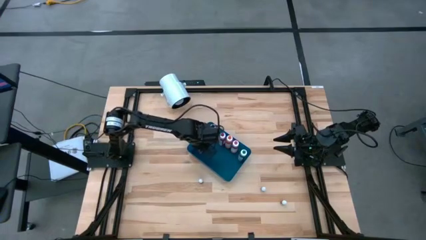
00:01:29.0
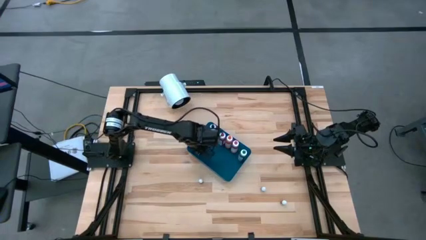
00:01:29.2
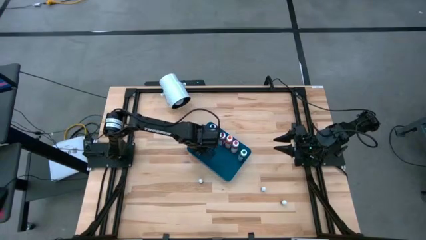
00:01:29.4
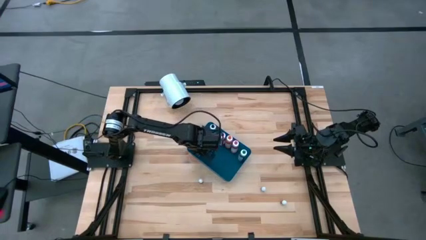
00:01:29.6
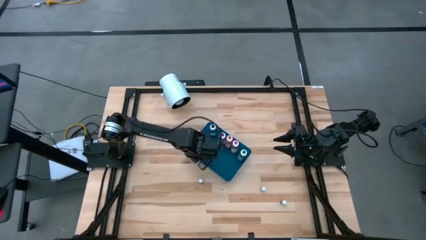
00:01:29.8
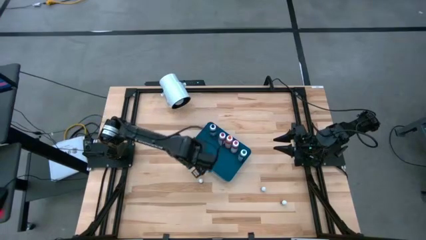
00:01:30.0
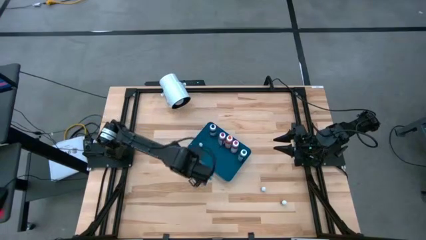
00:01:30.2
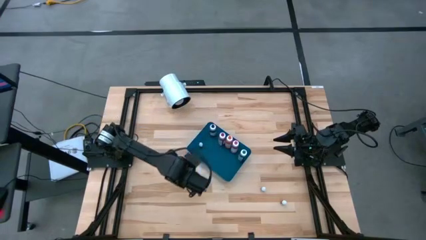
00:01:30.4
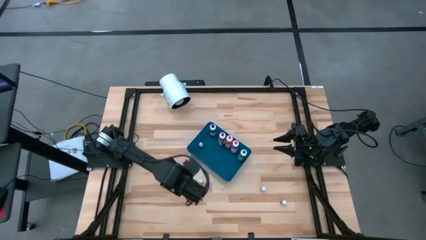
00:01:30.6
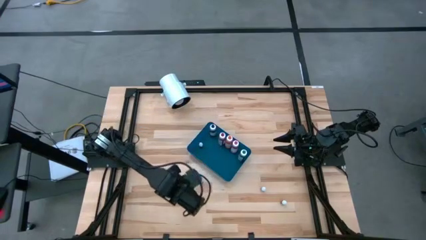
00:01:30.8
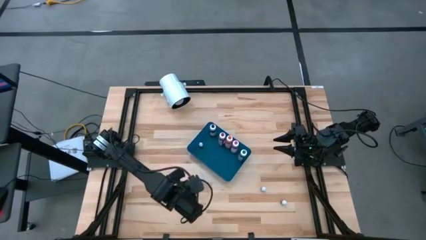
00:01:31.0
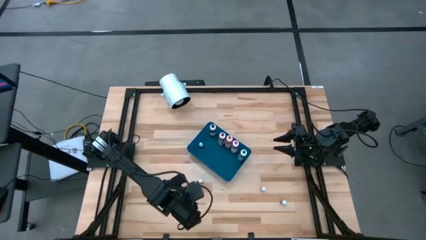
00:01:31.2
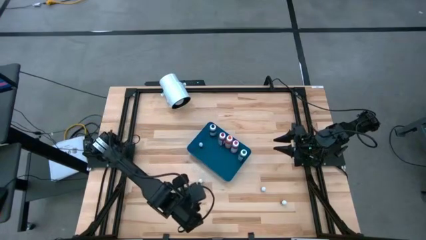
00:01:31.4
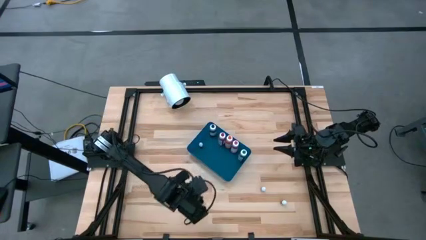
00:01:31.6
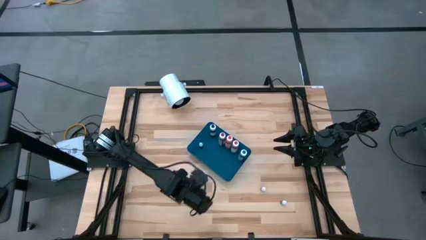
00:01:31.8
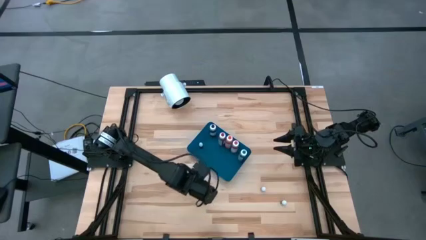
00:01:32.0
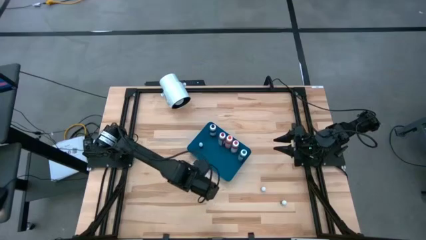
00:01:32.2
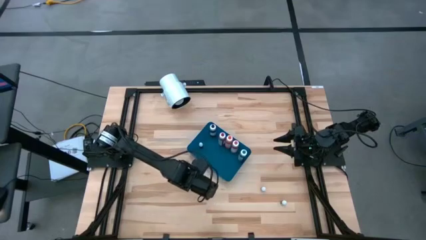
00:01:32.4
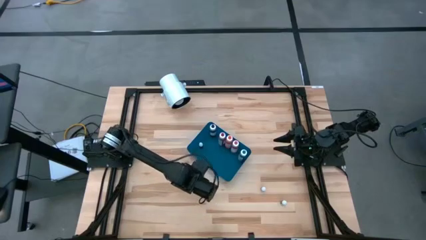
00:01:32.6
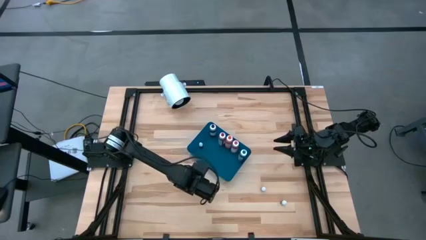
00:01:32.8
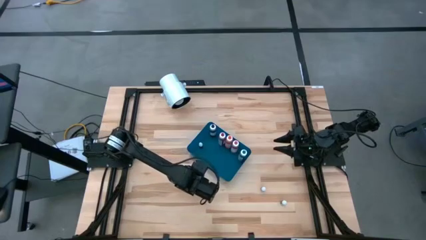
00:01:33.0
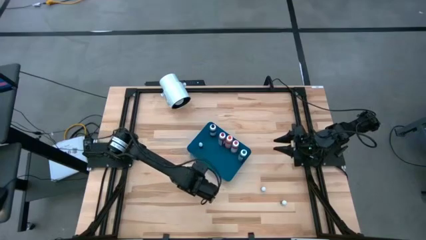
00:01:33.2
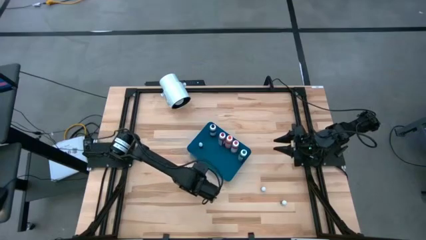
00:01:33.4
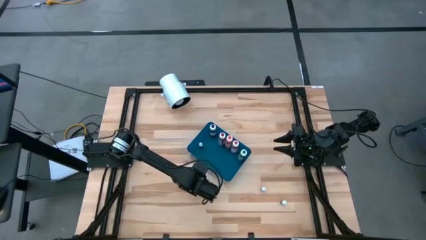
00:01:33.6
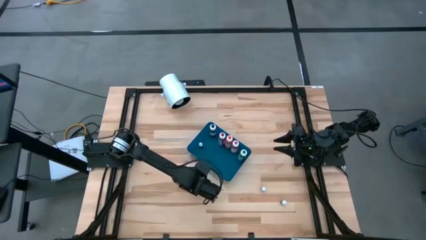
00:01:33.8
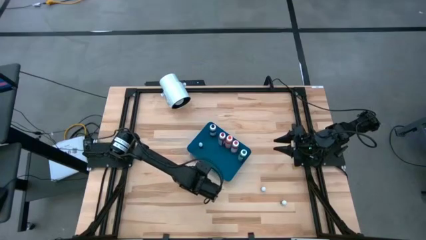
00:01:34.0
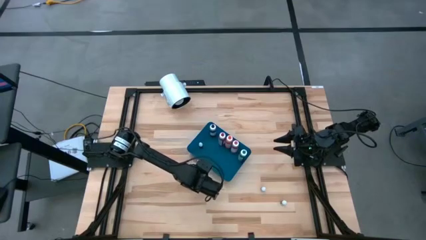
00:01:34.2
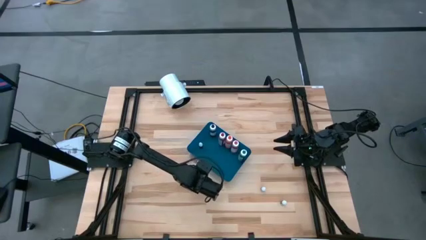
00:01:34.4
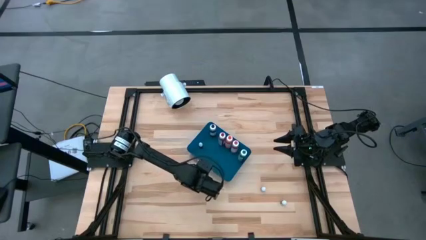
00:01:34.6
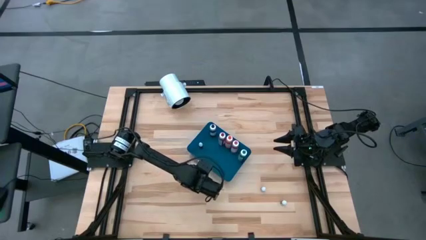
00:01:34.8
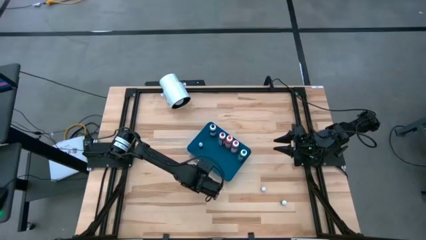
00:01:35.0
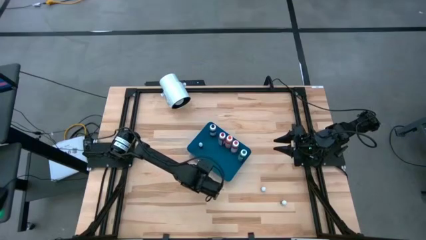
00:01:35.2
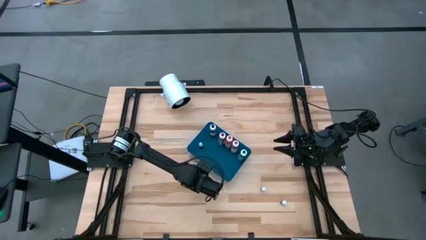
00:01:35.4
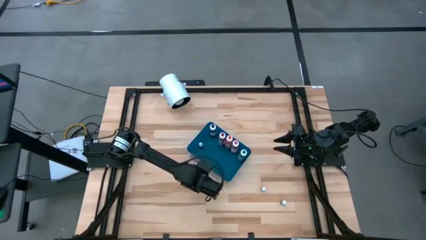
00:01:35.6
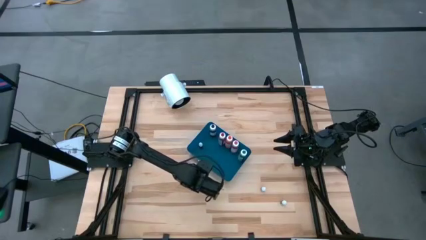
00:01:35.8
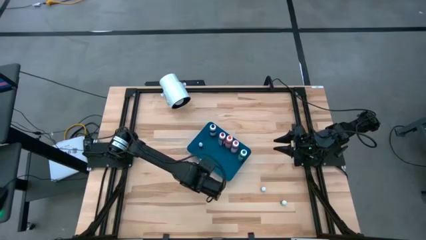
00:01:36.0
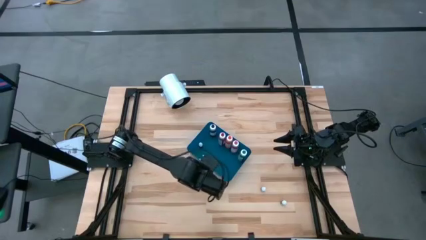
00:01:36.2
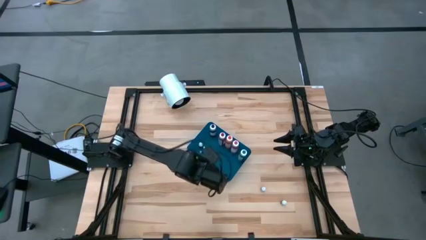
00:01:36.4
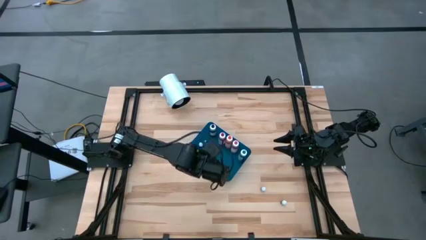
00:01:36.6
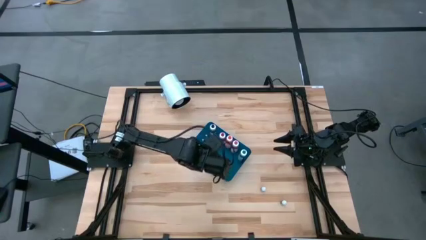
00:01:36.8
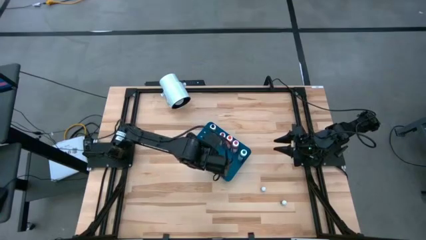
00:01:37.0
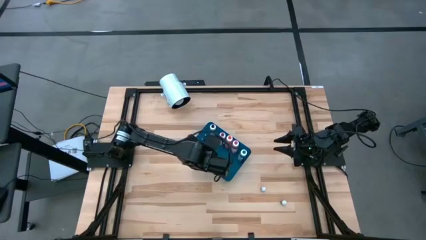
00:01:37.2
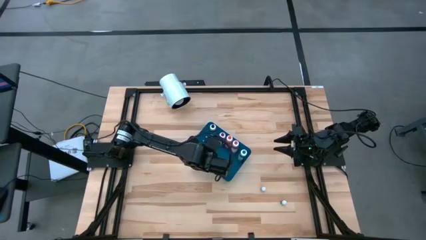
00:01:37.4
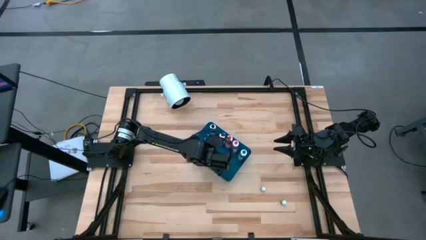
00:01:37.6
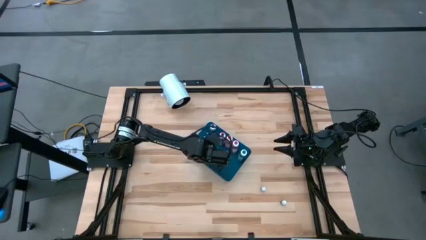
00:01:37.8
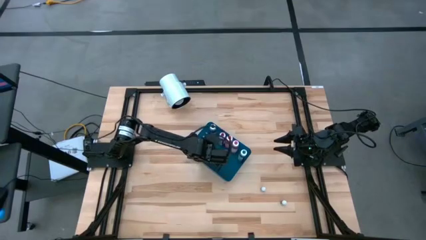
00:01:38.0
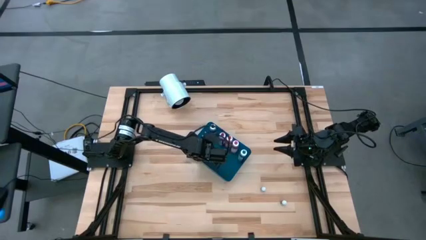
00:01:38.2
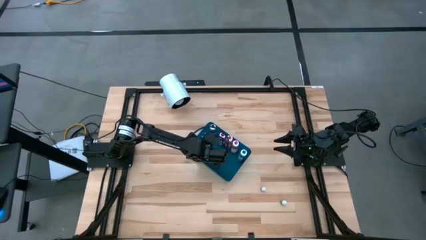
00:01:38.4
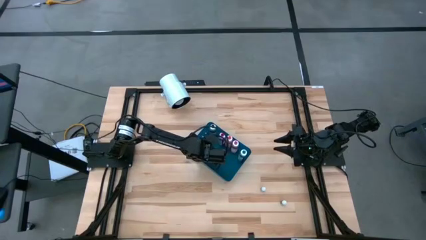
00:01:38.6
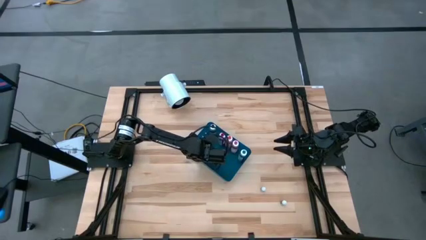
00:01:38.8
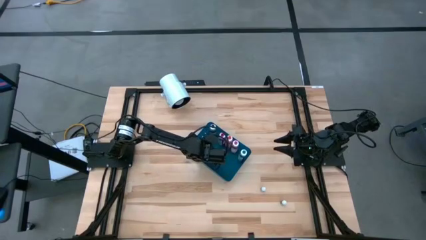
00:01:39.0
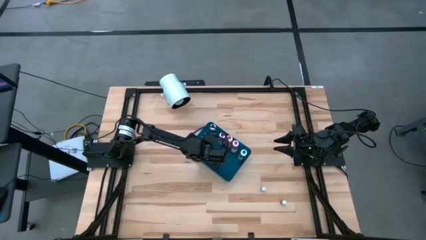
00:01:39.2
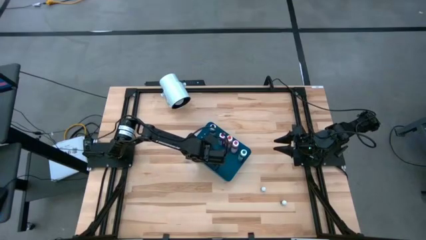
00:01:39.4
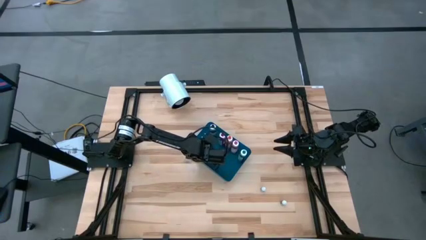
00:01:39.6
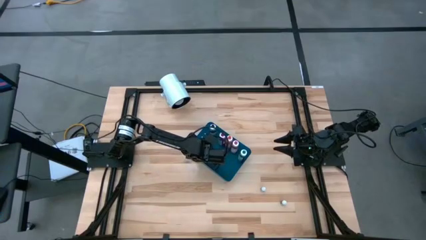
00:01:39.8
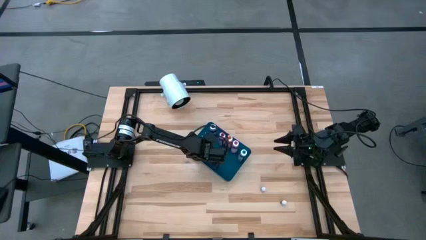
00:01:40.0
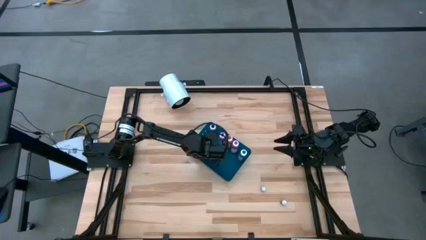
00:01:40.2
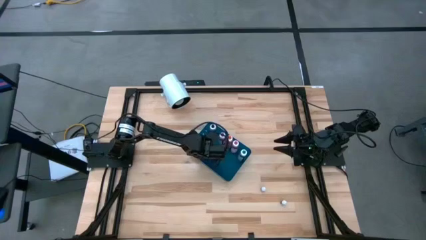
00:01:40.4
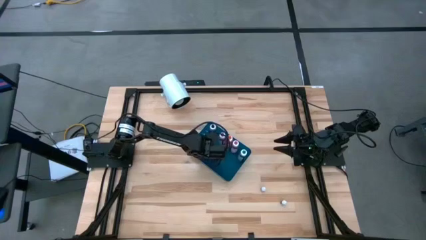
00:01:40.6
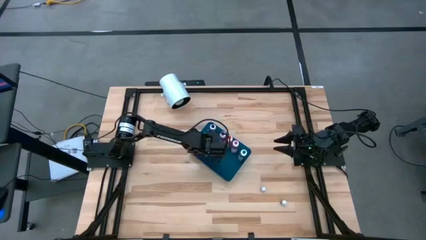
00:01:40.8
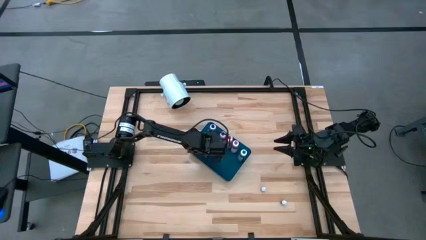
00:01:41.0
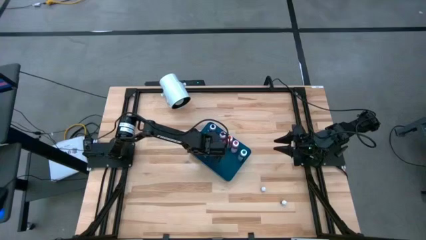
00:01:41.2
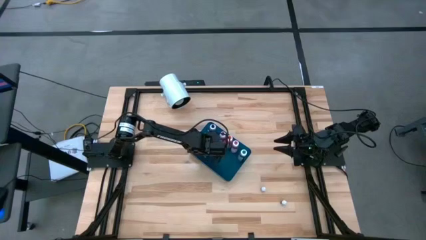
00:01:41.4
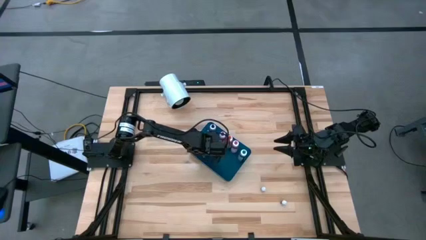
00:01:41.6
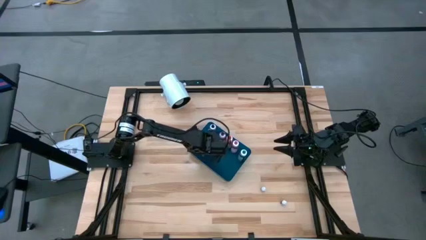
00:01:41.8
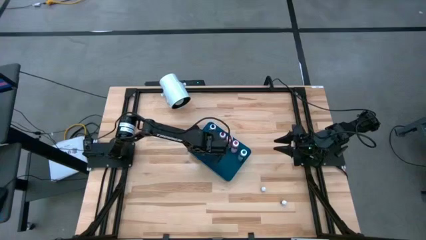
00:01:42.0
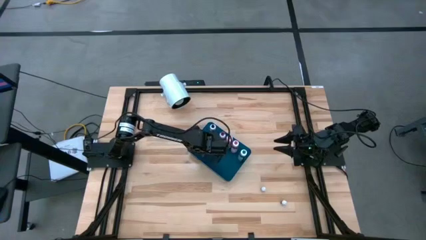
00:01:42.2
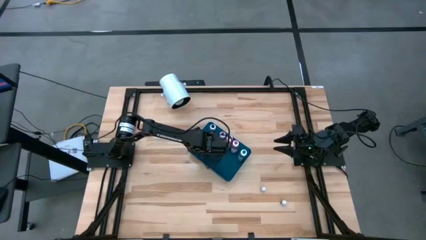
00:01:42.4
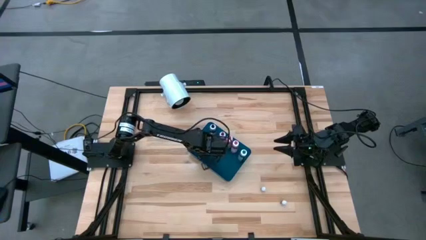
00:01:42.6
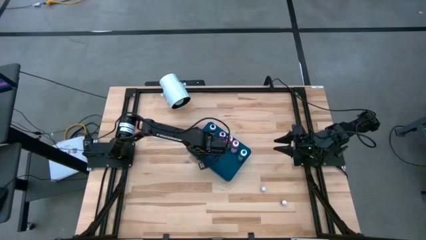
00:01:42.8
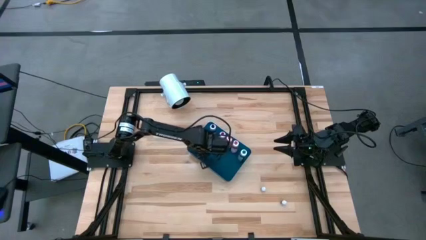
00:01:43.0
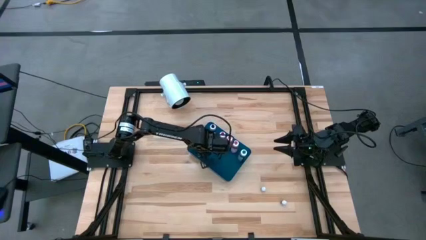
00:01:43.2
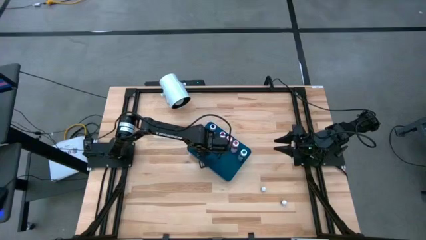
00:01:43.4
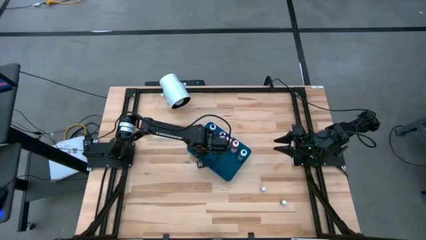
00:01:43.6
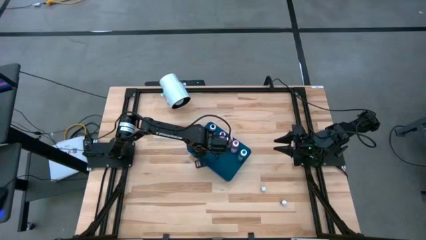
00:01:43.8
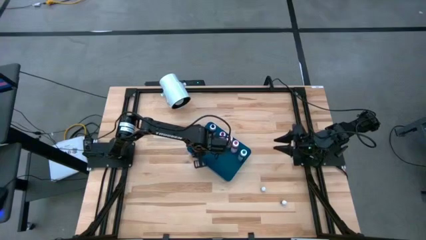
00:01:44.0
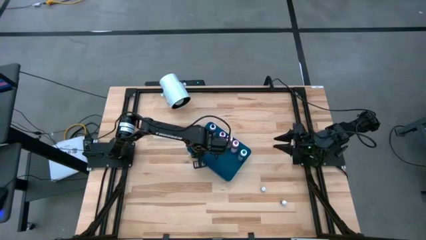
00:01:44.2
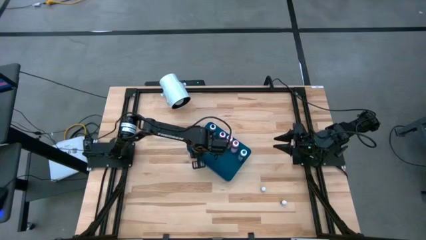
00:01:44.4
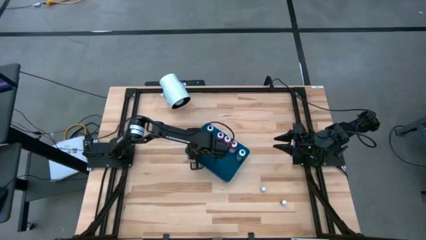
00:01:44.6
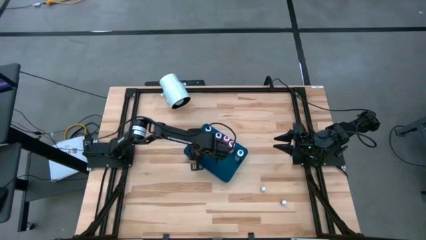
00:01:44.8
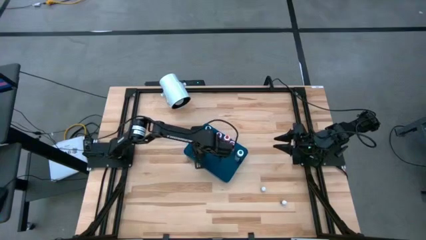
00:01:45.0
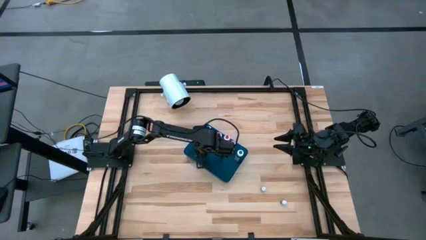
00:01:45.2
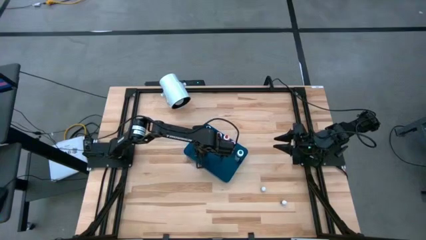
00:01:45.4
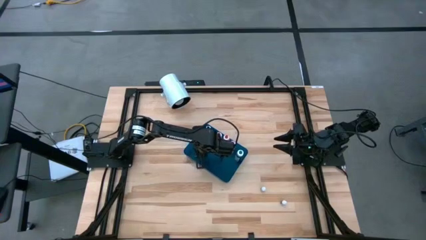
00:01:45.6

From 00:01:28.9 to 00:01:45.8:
Task: Pick & Place food coloring
Put the small purple food coloring bottle into the blue bin
